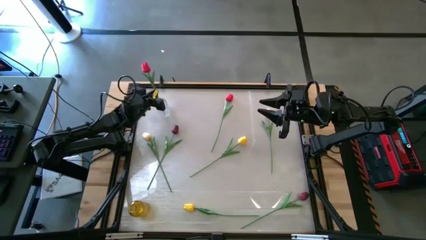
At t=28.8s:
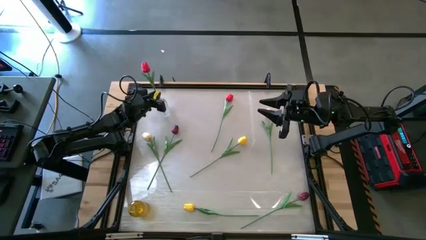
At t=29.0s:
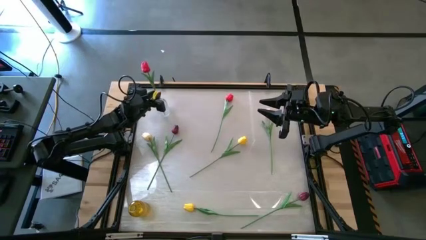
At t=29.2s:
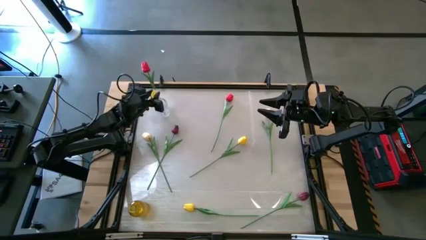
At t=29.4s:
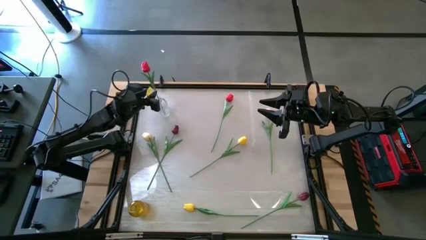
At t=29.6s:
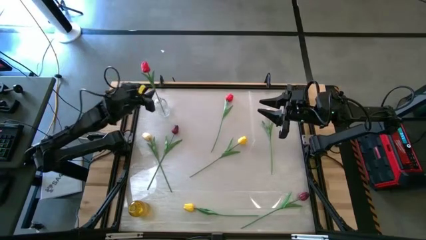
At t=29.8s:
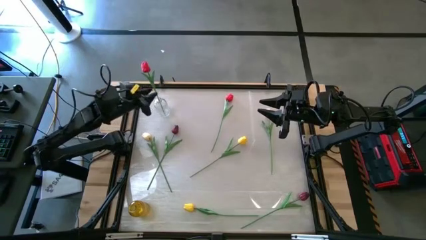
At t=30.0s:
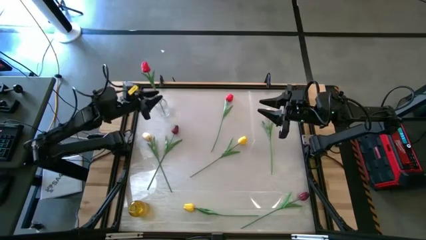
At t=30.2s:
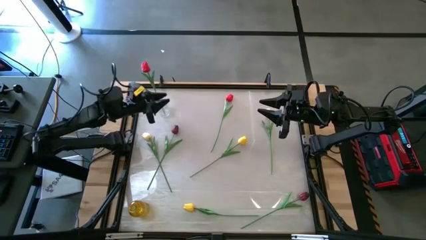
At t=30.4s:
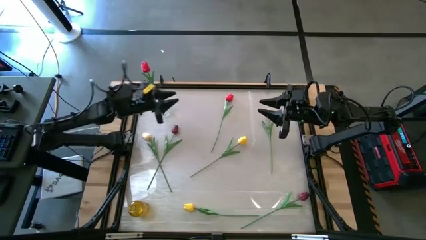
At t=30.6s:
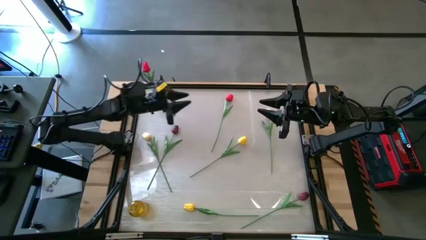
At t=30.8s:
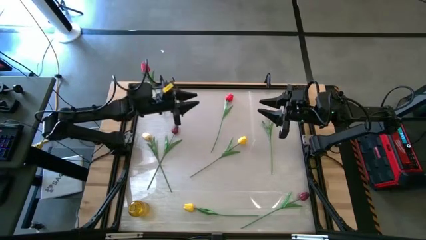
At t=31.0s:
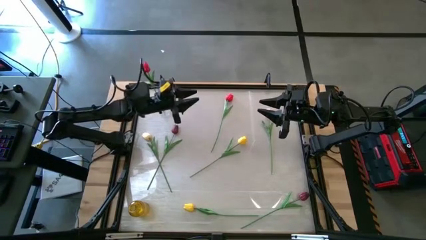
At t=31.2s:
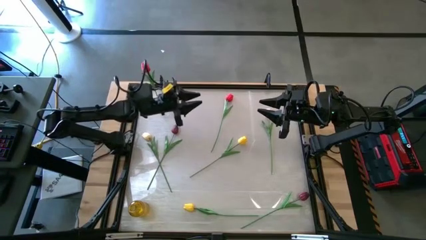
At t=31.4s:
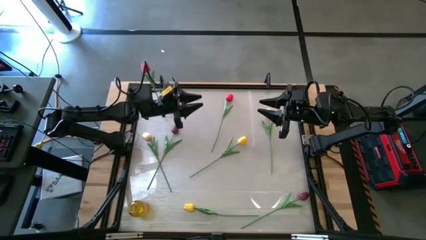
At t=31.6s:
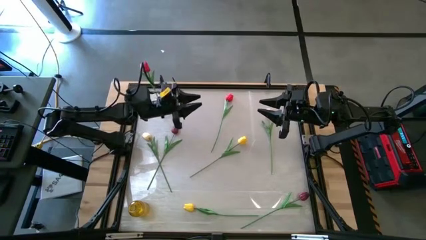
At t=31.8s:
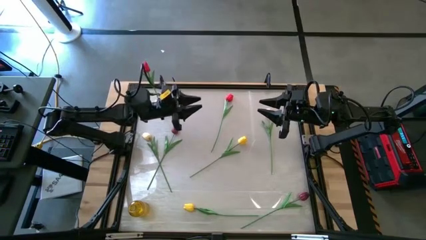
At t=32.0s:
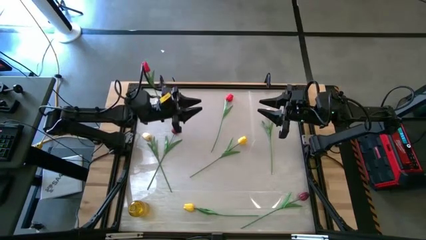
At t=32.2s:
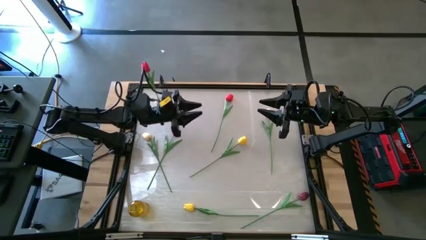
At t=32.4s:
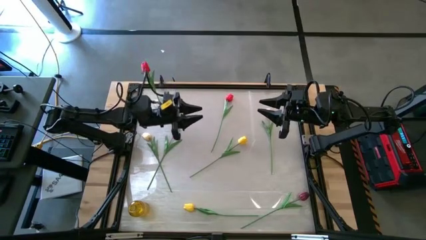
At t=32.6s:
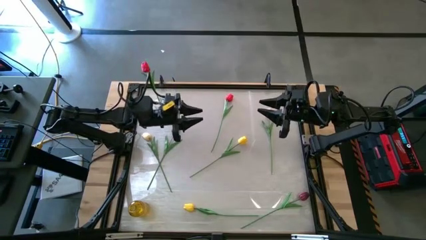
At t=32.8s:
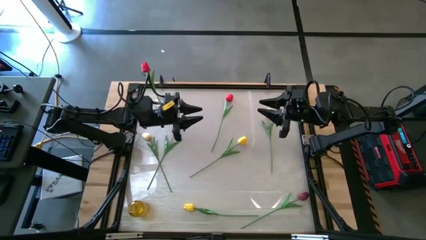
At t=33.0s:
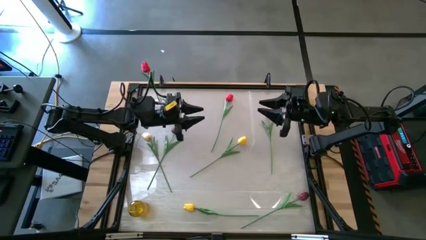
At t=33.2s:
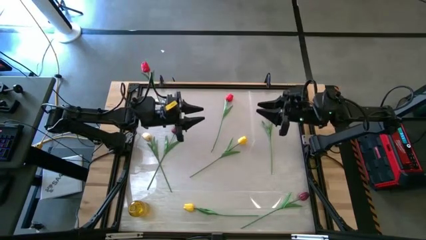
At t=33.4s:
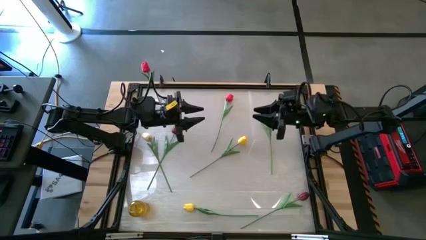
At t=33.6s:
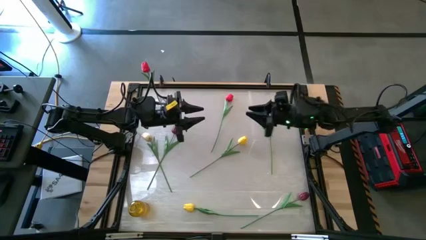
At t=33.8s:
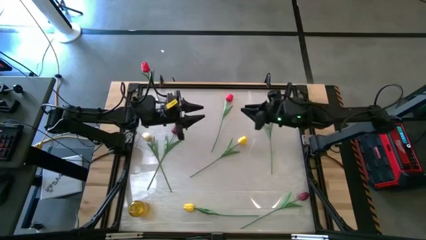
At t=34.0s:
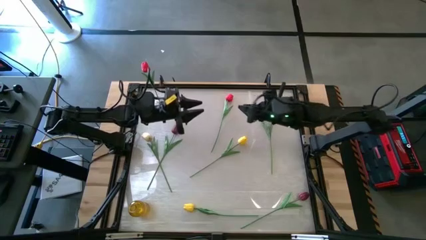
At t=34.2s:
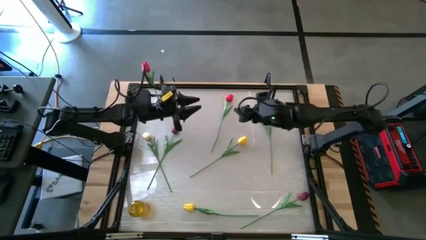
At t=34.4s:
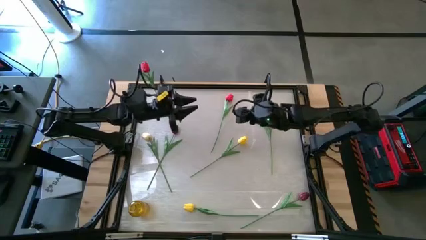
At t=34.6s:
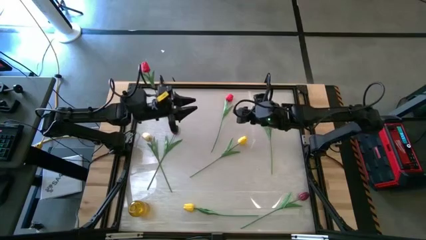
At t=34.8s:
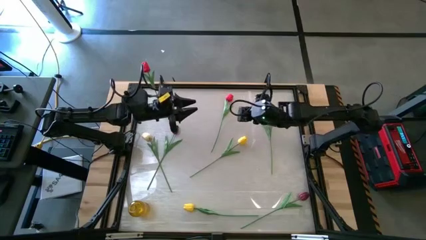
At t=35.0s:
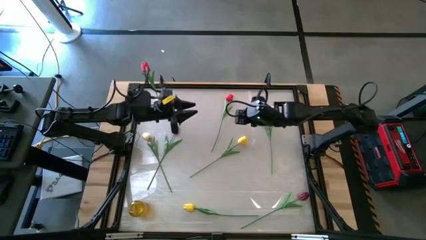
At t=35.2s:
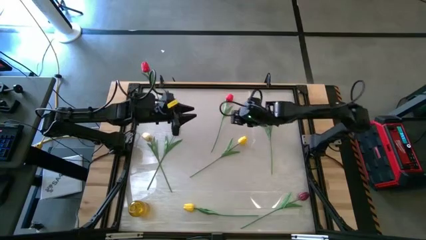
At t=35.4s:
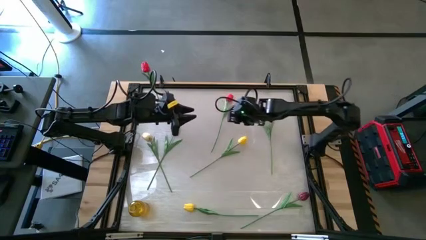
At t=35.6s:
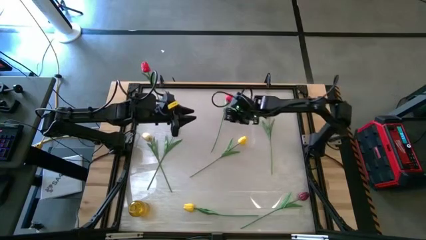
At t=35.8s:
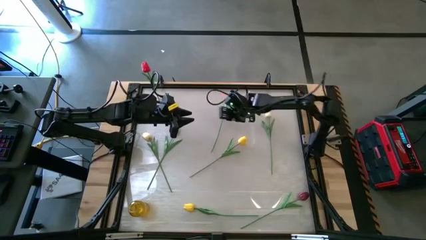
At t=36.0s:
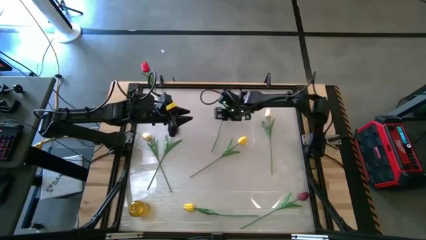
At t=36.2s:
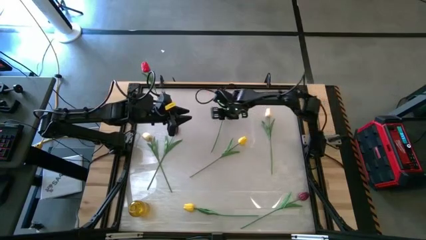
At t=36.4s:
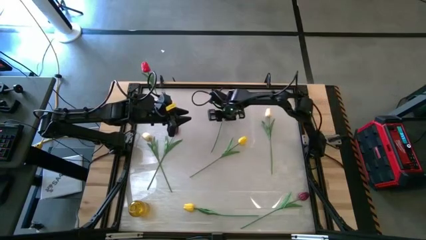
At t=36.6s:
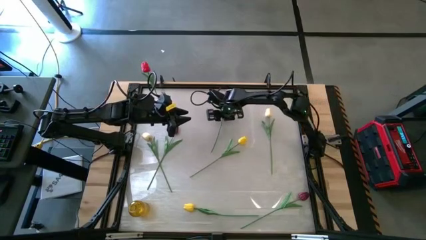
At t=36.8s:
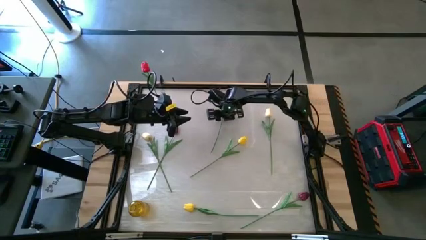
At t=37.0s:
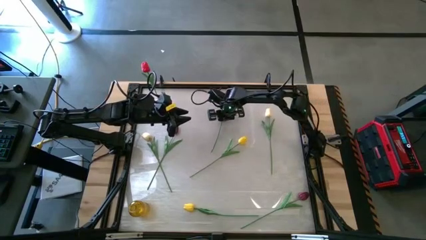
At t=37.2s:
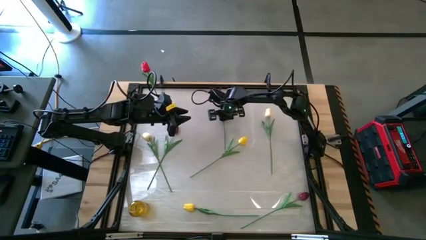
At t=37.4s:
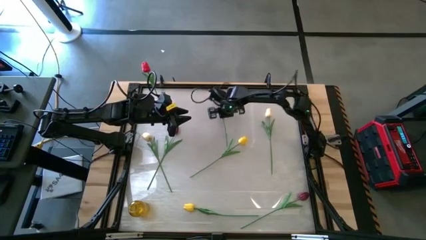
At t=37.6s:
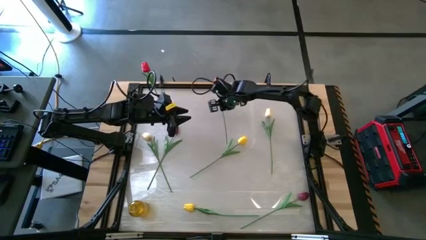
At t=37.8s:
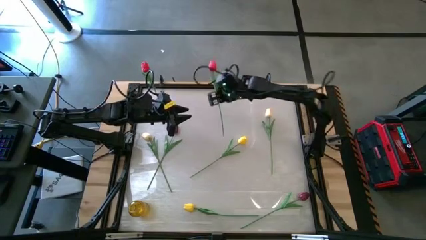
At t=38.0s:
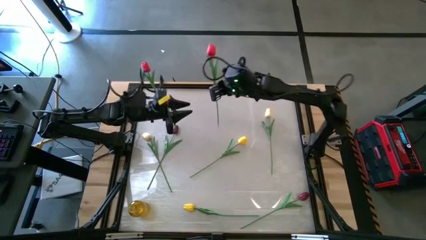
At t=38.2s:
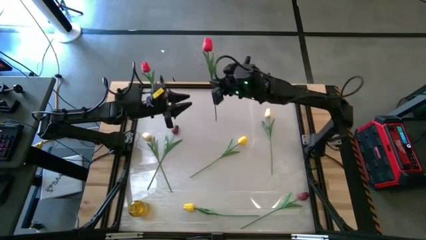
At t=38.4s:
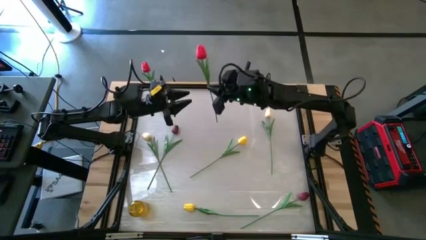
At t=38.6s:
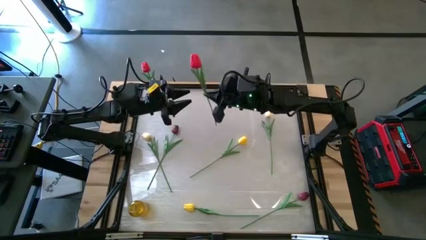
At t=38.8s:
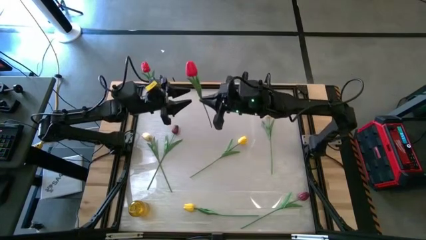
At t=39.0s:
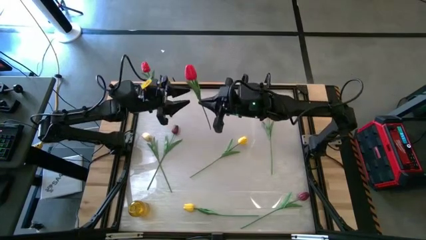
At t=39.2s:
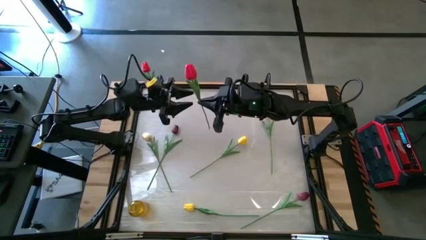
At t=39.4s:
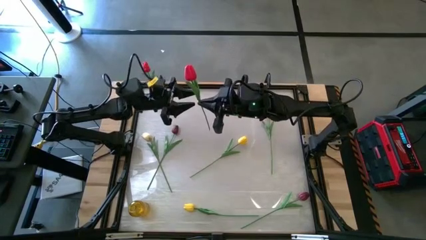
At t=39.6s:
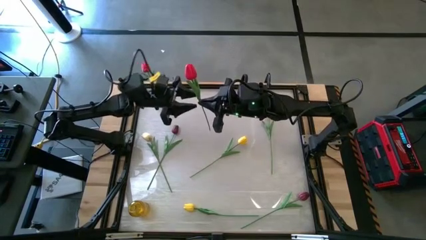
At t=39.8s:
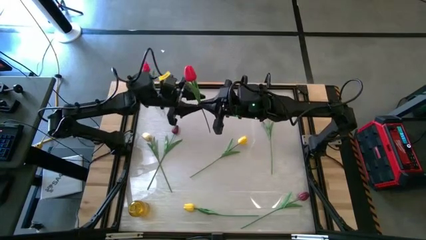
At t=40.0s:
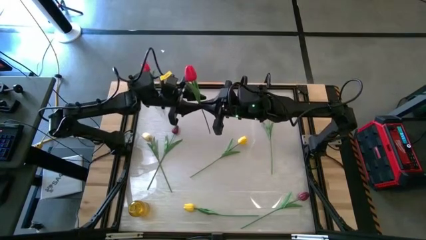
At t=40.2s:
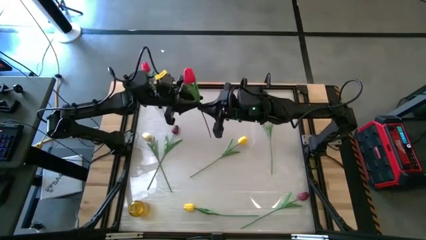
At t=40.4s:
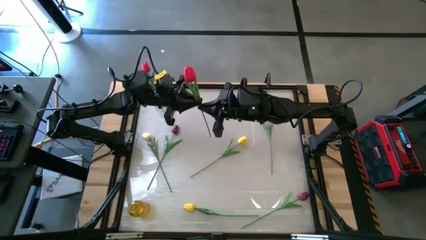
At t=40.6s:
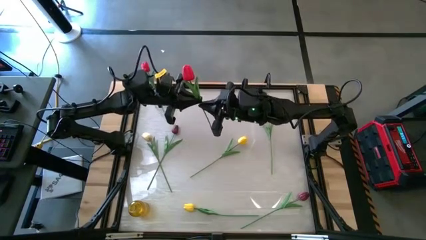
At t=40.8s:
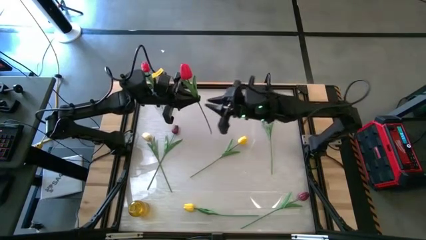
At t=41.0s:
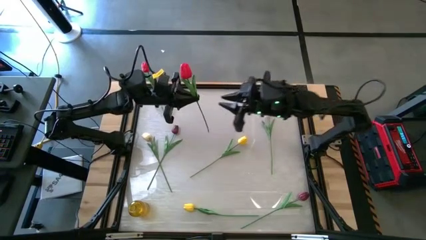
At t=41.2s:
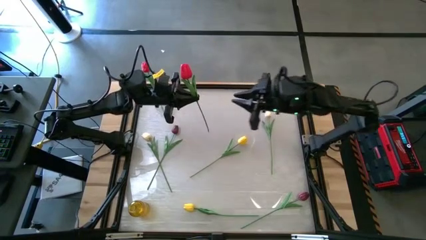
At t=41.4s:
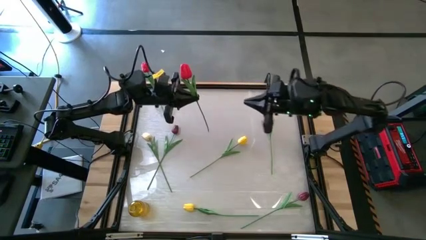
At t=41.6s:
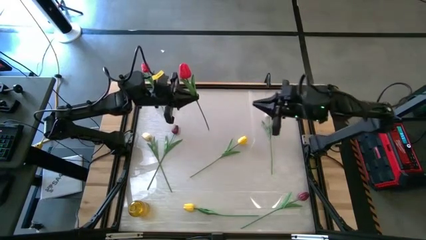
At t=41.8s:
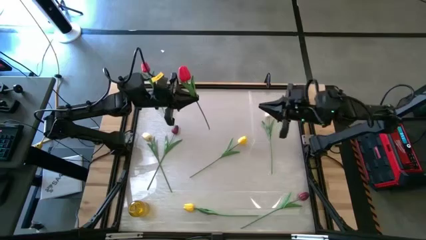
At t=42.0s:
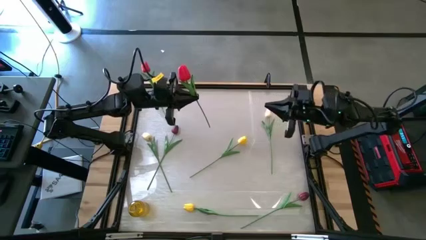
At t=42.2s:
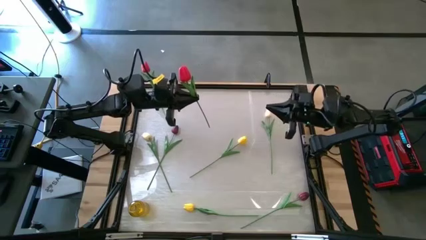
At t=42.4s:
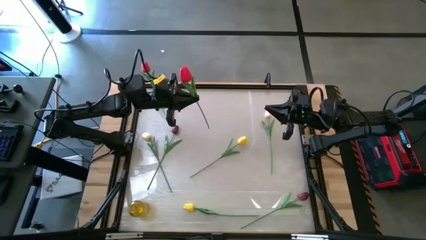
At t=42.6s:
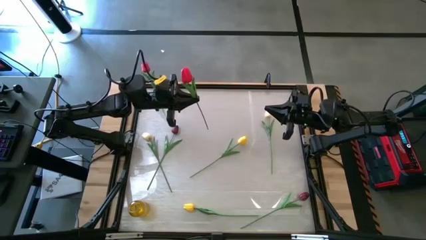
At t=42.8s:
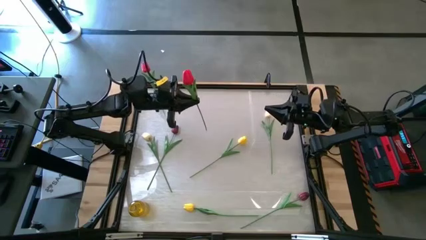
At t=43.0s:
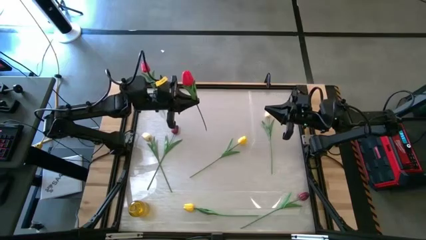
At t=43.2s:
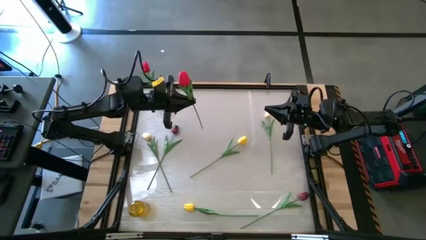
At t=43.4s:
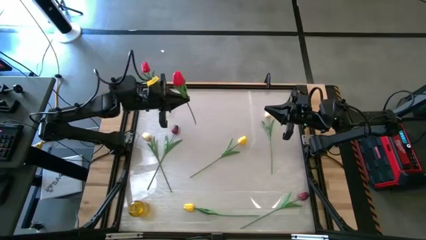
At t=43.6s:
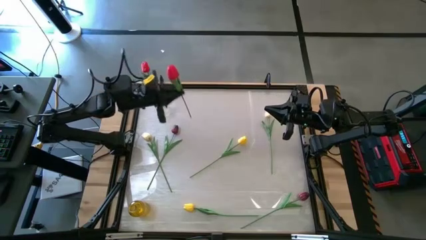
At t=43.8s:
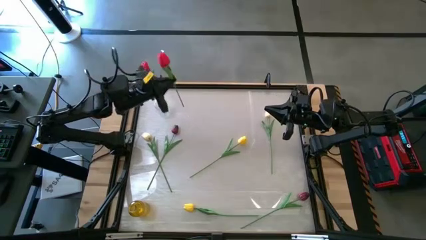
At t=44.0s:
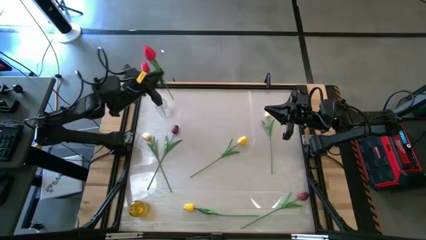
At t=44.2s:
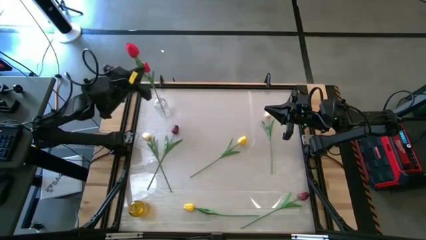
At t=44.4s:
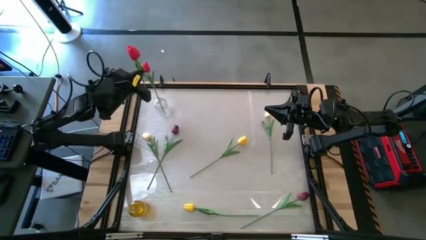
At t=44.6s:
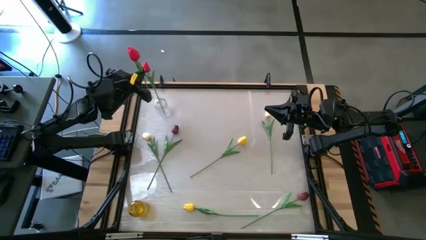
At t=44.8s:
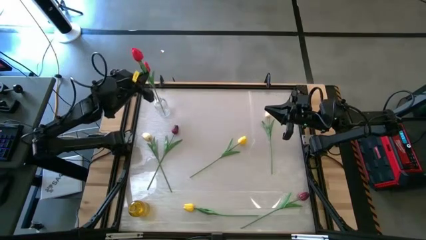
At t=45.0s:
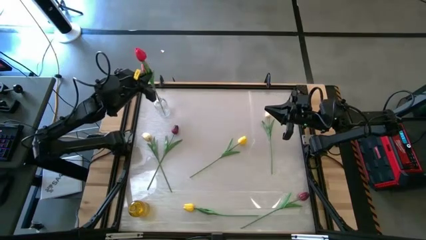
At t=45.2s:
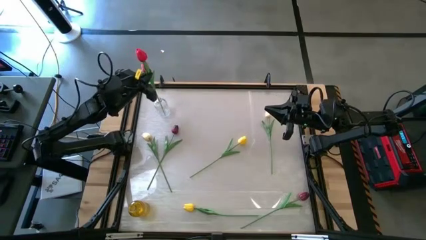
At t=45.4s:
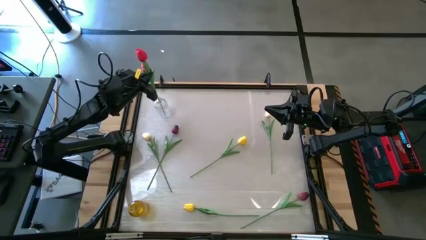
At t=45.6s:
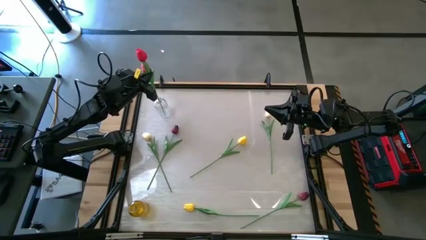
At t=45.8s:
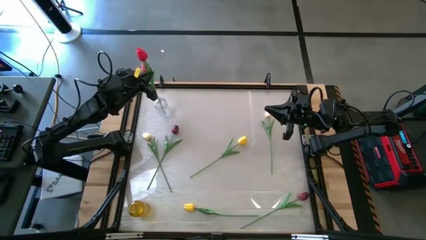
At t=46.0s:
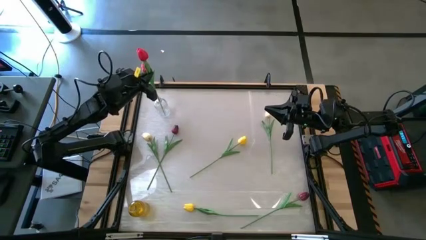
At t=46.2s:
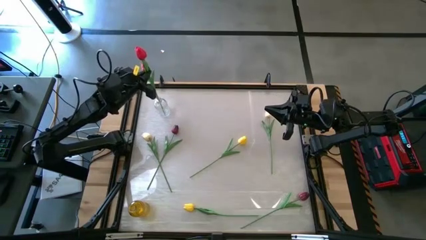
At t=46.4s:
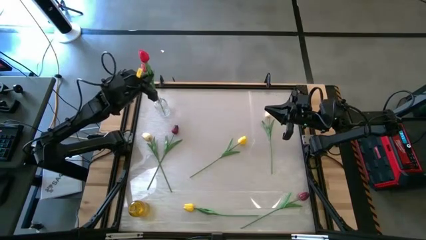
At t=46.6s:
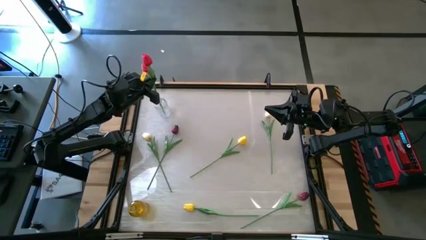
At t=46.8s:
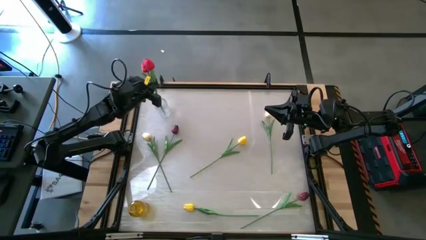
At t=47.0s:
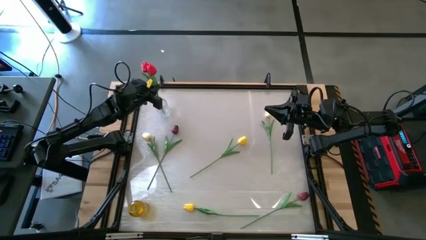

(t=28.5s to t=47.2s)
Task: Sort flowers into vase by color
Put the red flower into the transparent vase
